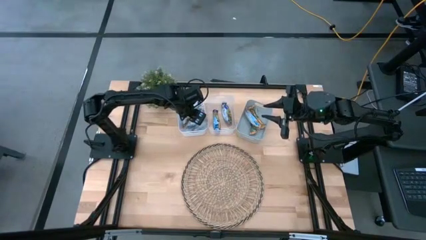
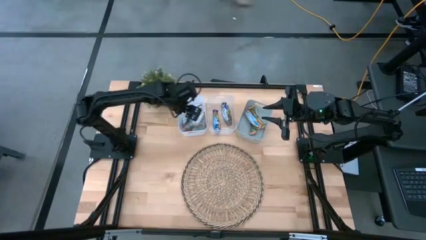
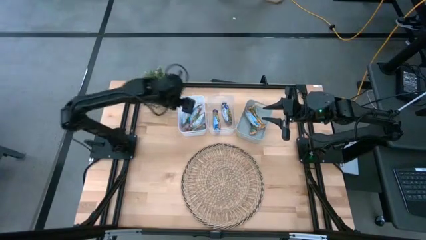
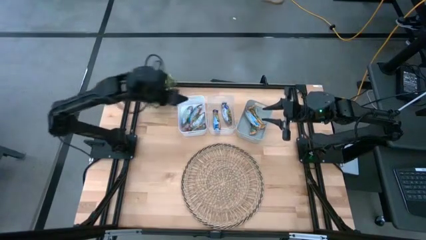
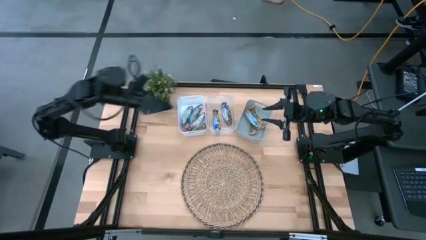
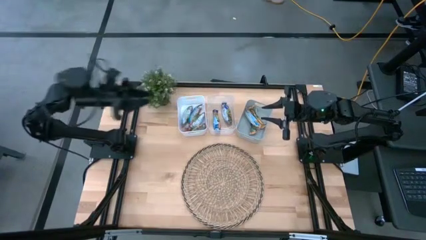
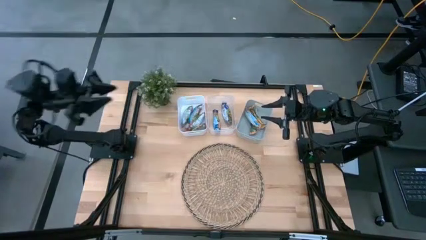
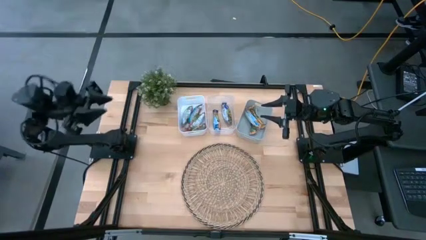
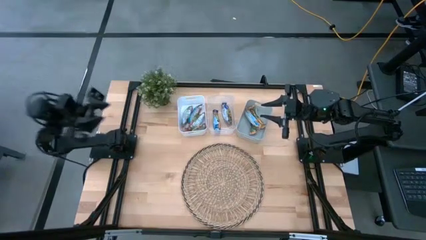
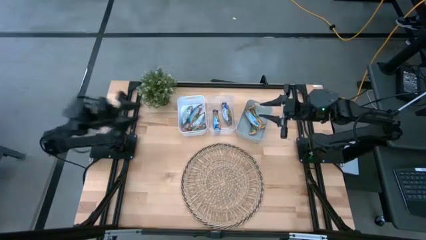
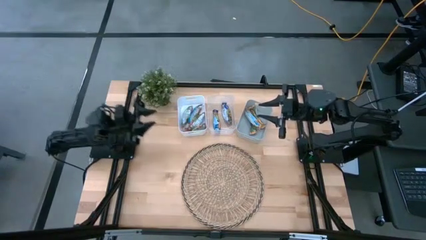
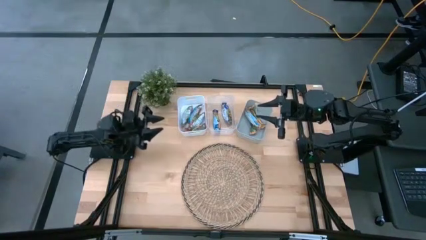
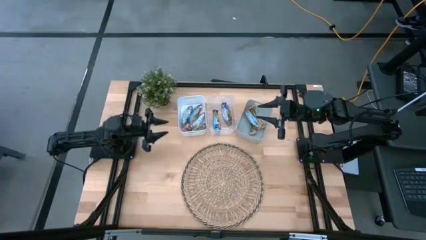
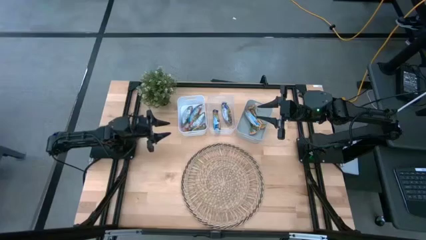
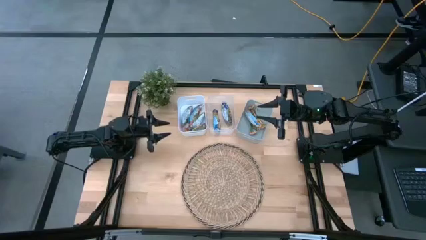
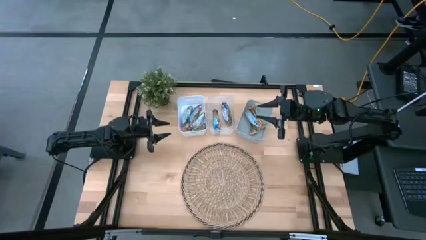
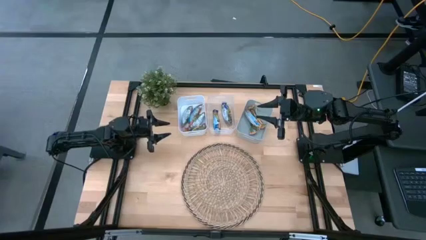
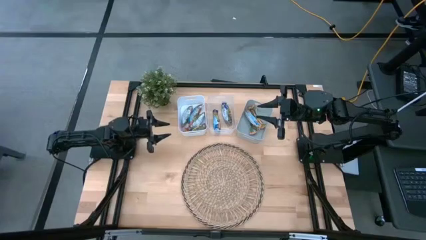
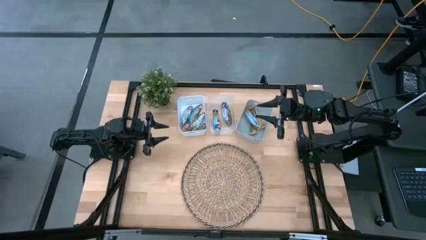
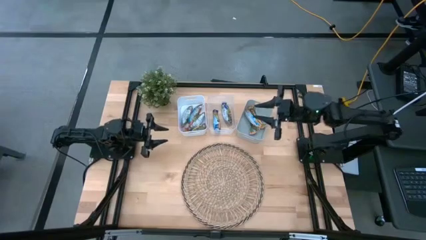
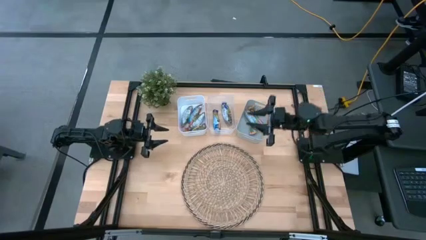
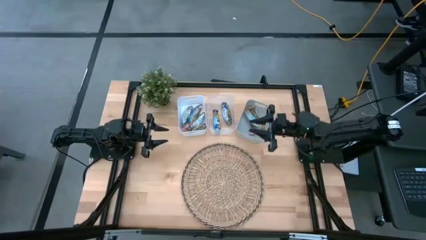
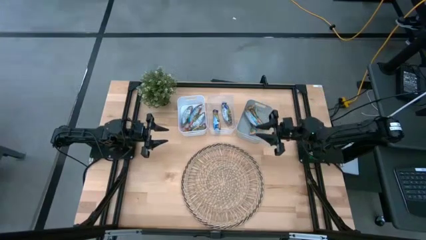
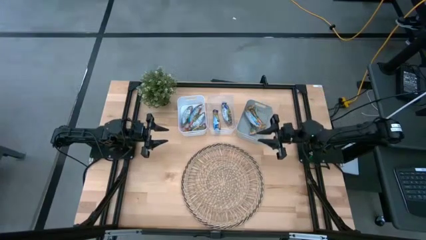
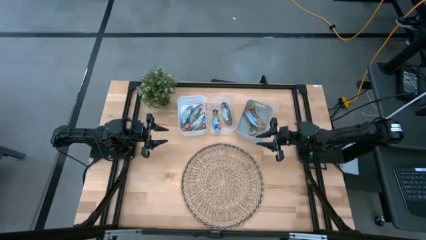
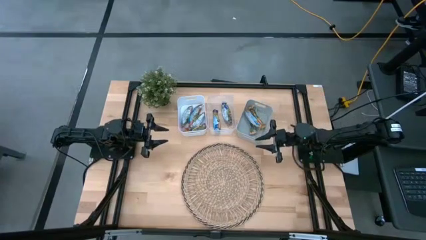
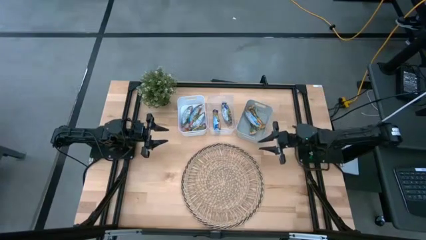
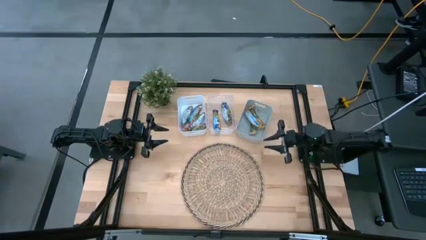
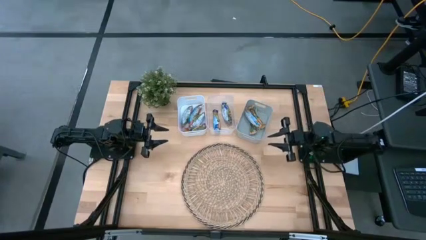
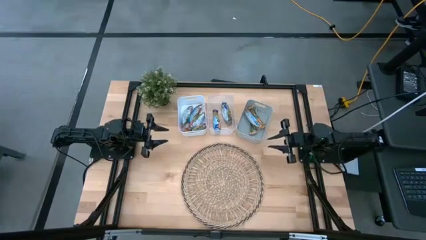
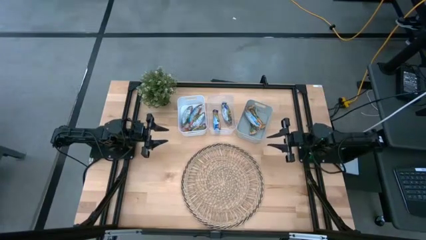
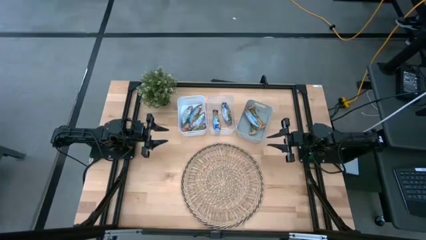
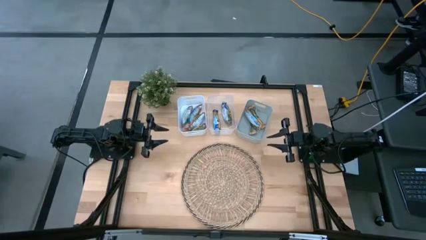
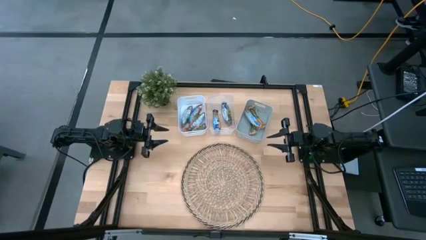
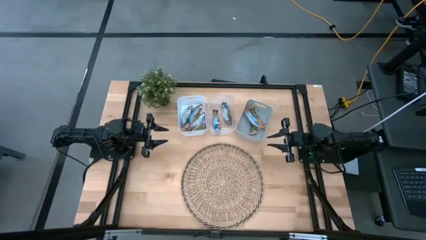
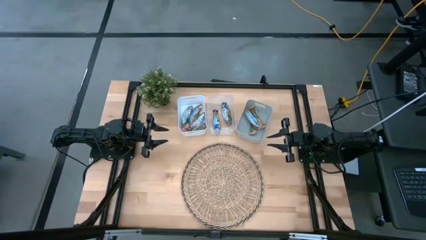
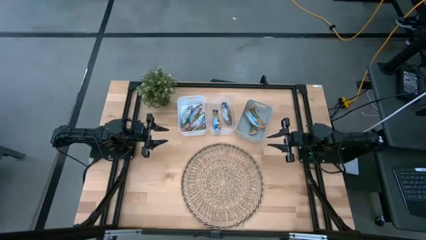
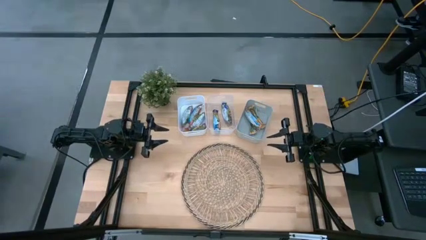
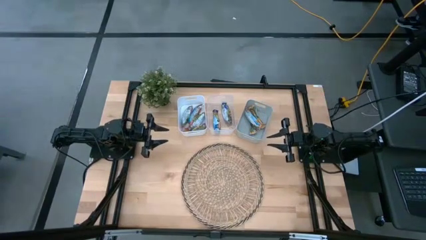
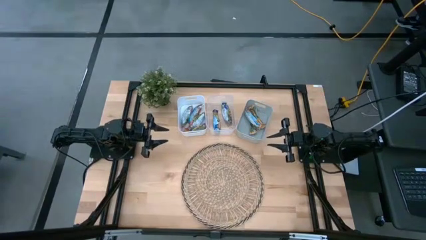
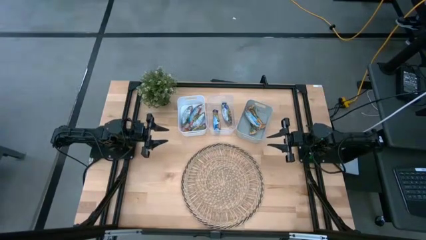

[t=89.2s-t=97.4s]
Task: Pick and place Granola Bars by type
Return to Home Position

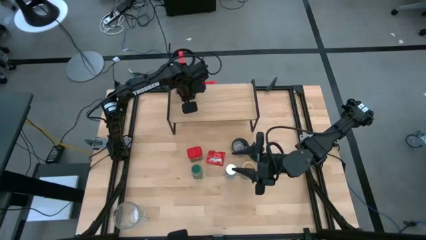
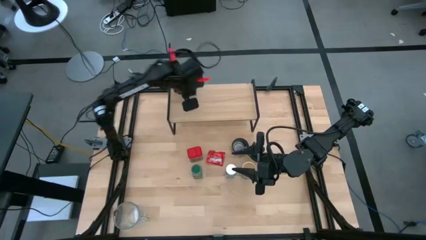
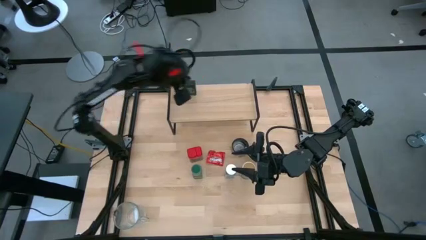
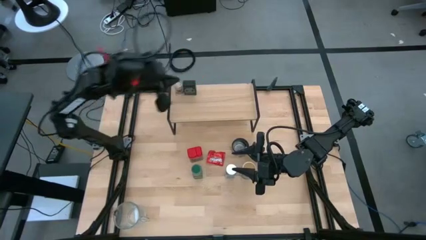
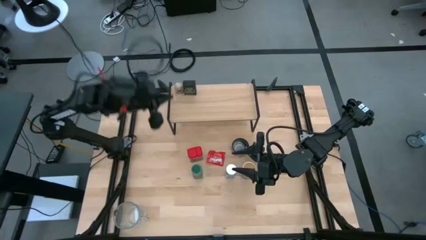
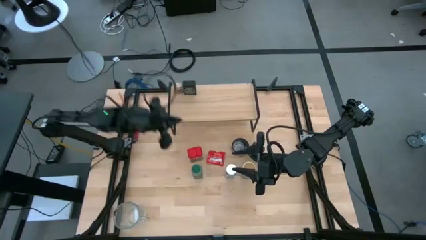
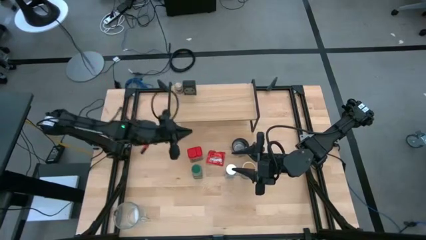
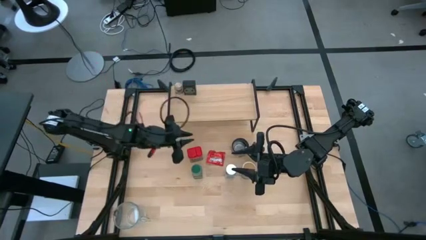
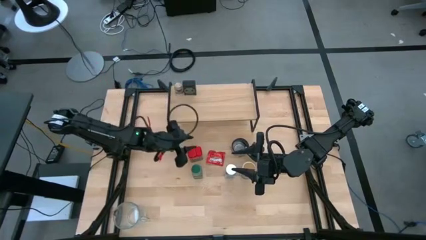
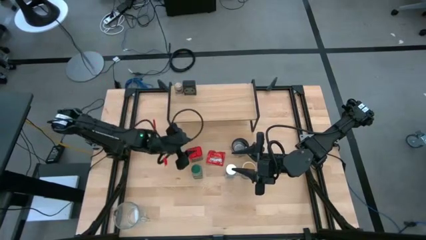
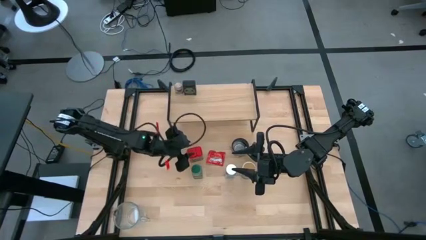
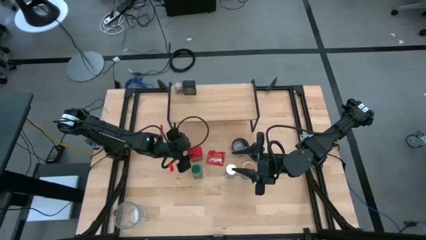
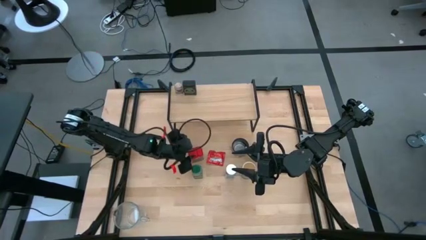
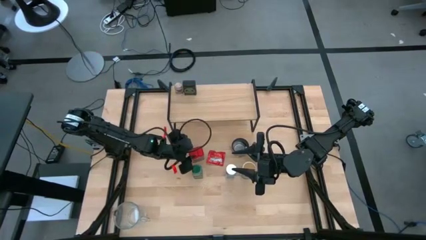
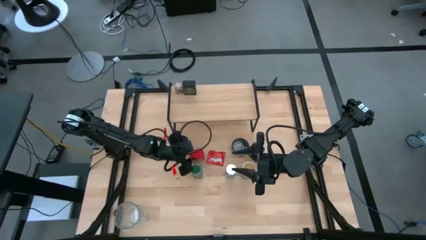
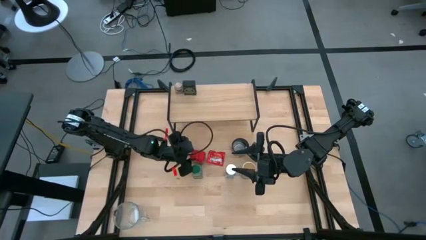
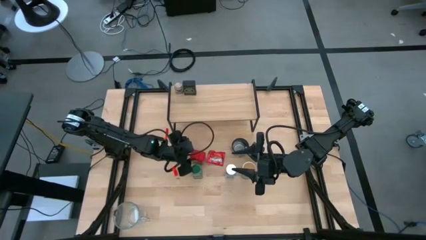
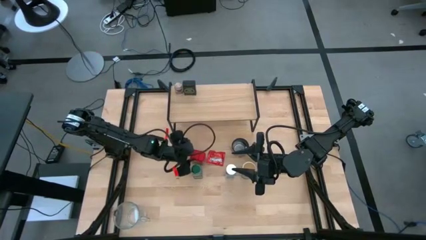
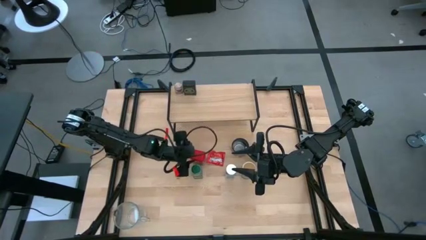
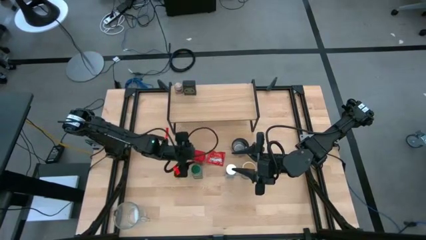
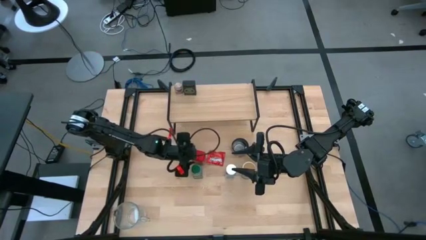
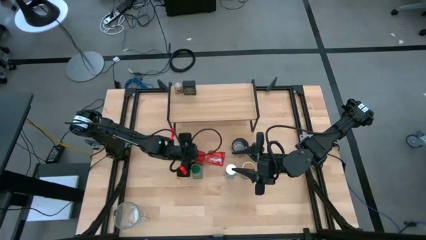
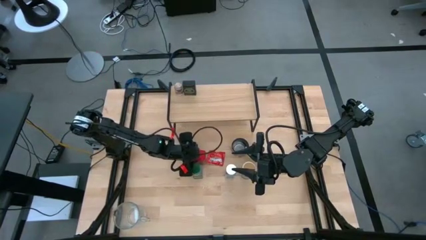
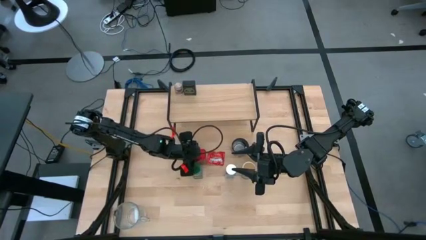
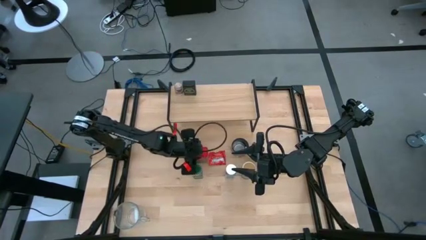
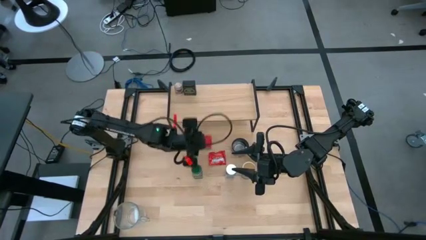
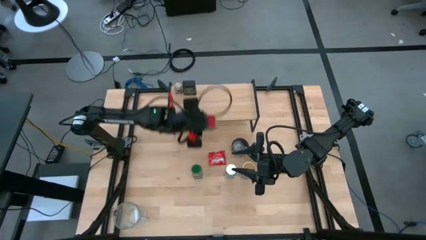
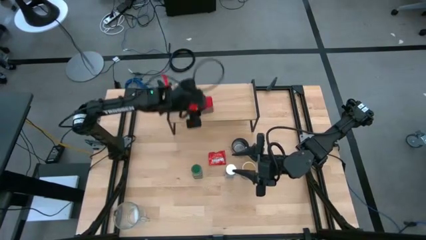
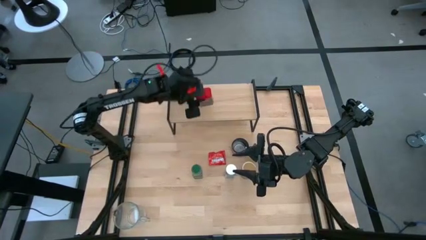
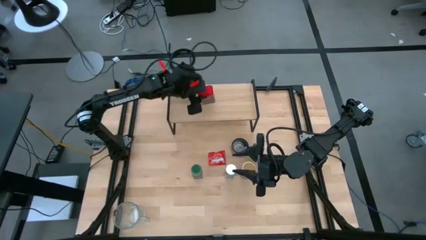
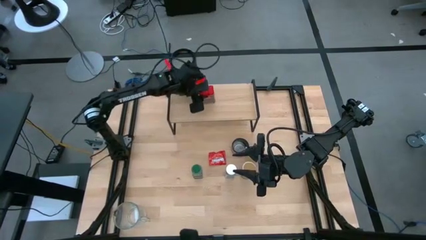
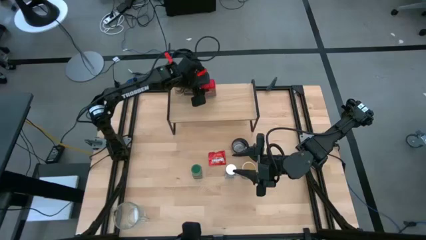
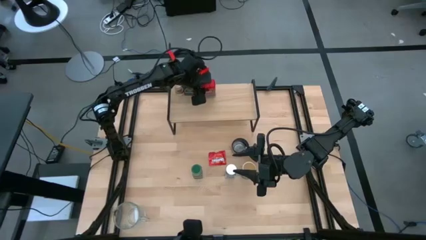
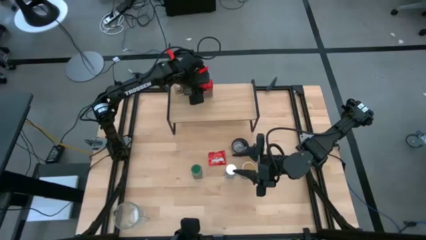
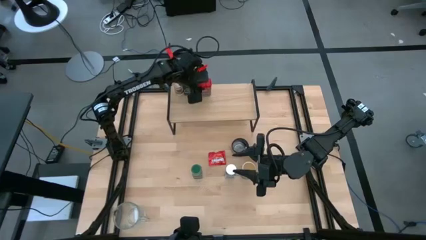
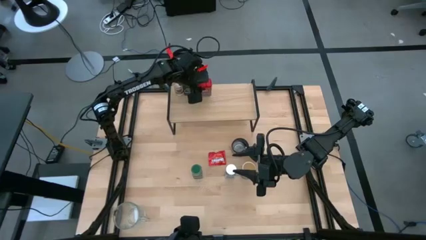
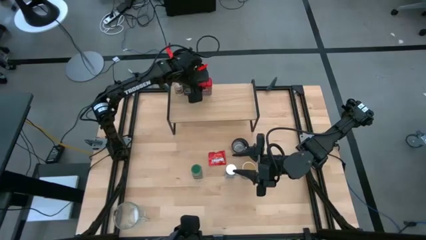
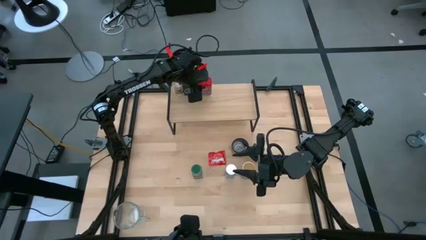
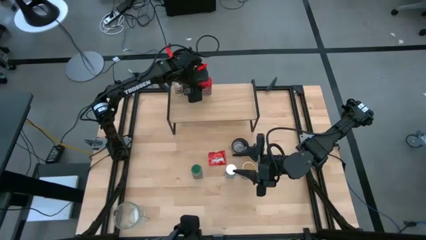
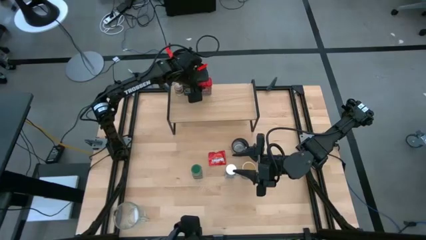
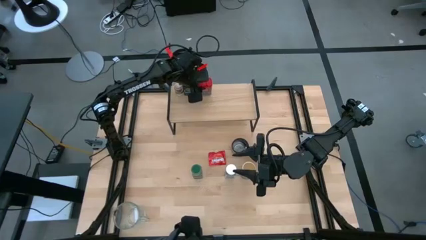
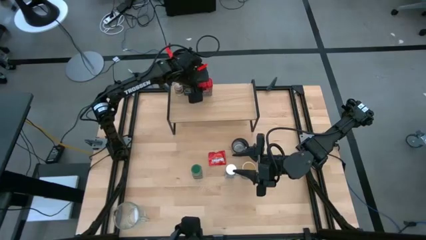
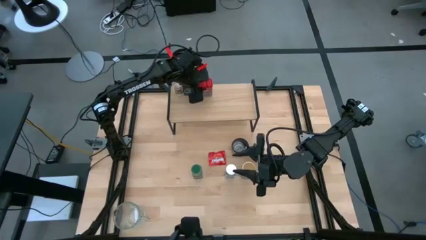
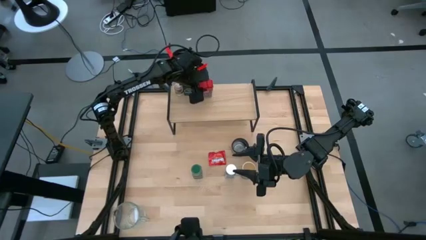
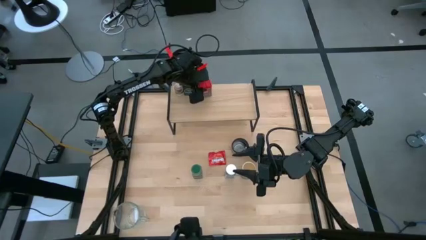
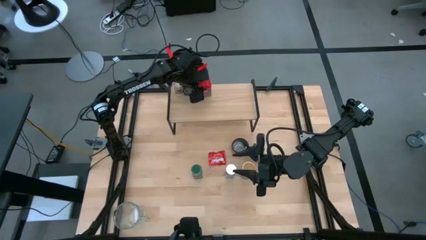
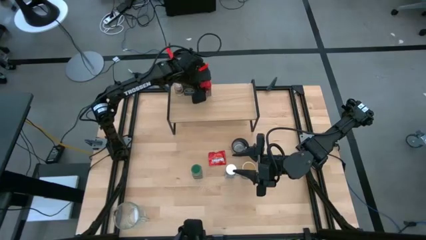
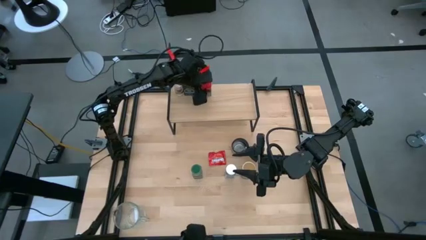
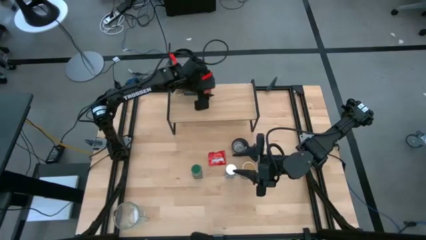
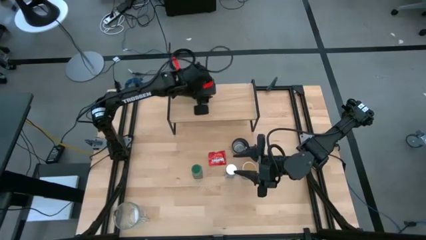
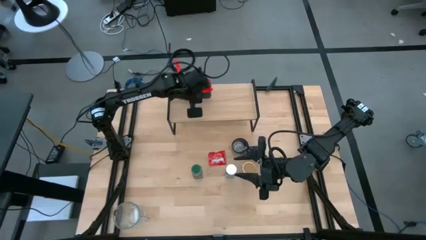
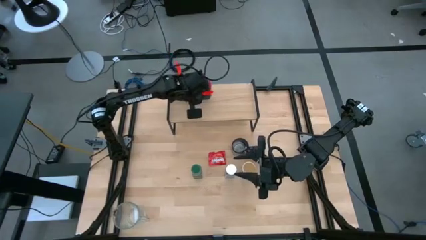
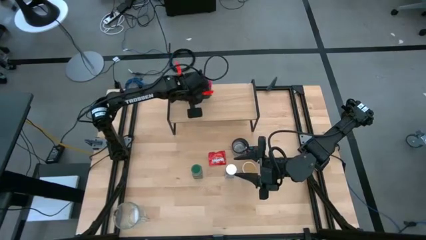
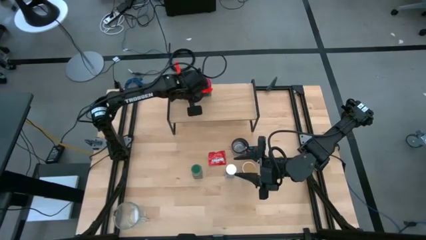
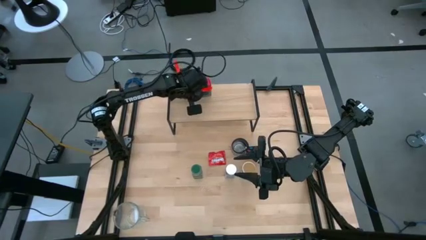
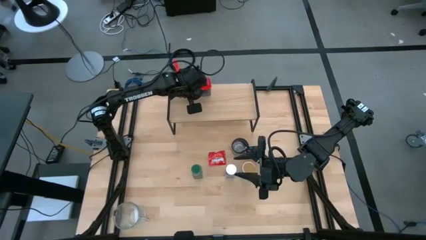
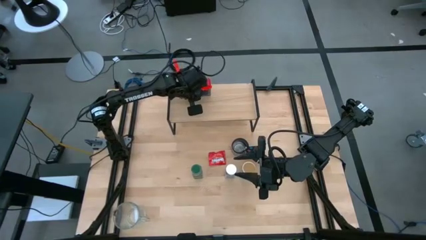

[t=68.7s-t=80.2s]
Task: Shelf spices
Put the red seasoning can on the shelf
